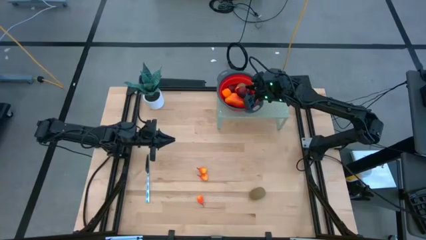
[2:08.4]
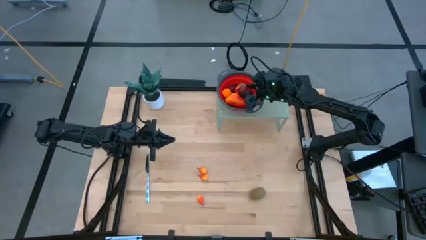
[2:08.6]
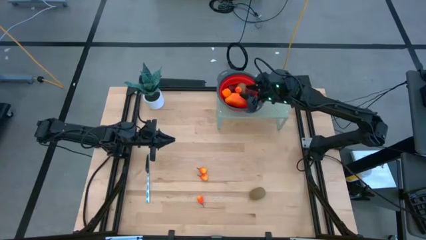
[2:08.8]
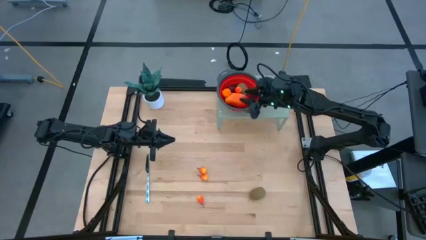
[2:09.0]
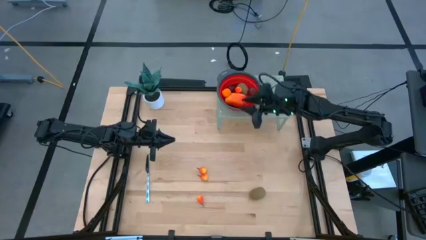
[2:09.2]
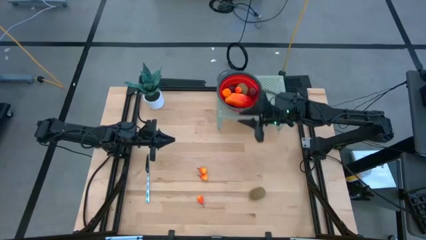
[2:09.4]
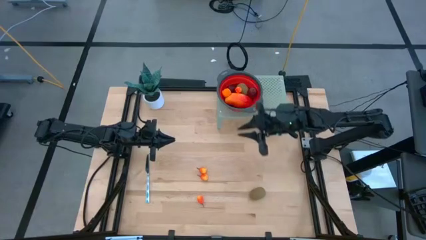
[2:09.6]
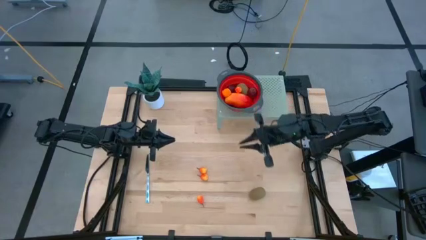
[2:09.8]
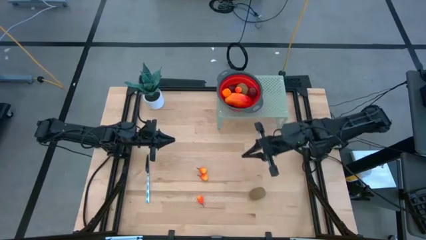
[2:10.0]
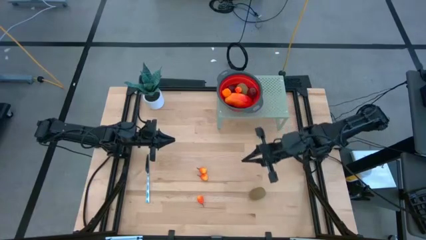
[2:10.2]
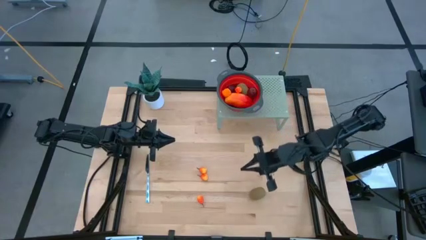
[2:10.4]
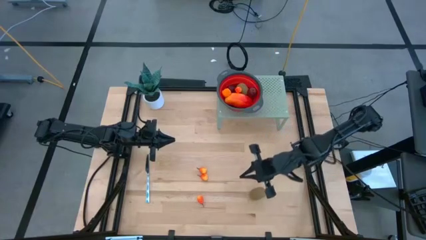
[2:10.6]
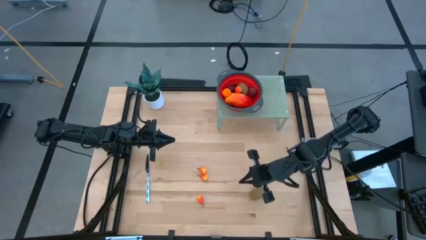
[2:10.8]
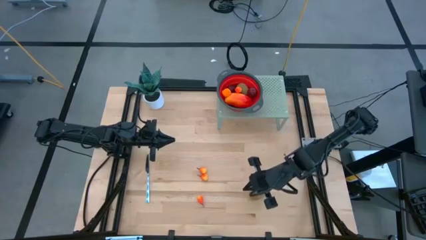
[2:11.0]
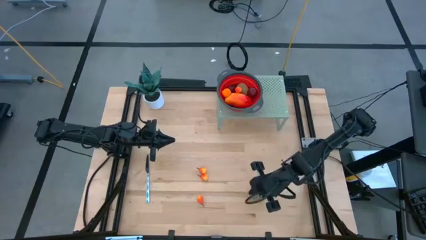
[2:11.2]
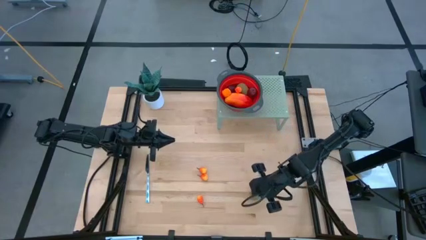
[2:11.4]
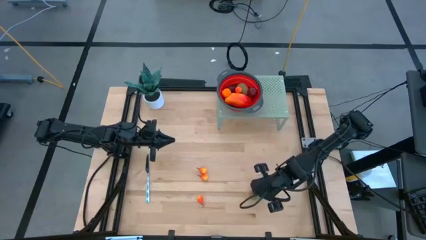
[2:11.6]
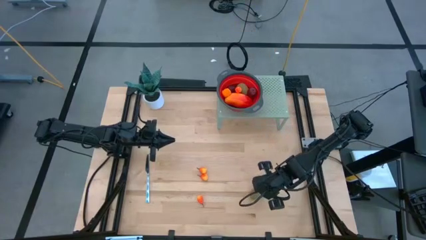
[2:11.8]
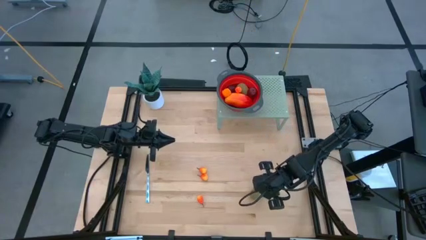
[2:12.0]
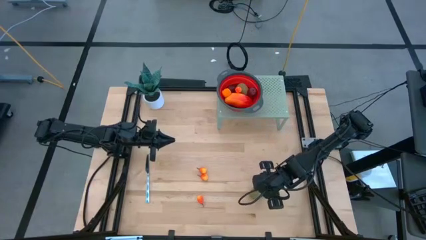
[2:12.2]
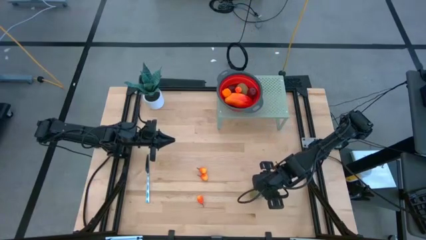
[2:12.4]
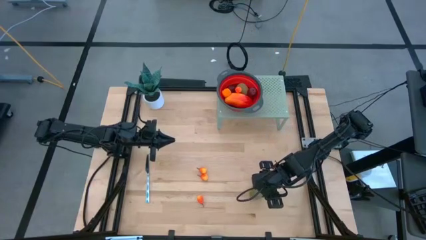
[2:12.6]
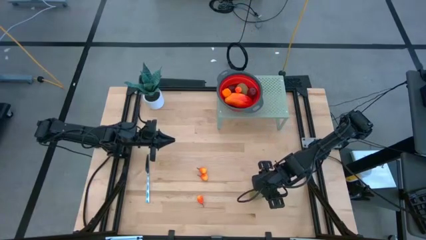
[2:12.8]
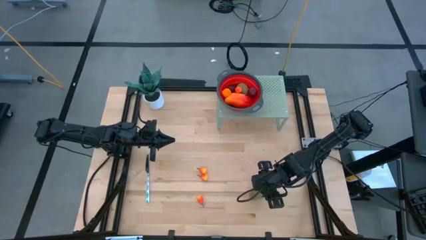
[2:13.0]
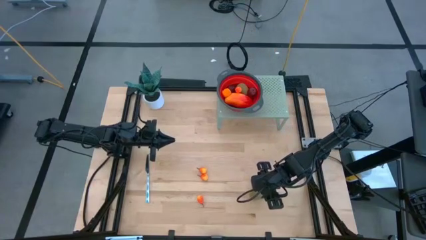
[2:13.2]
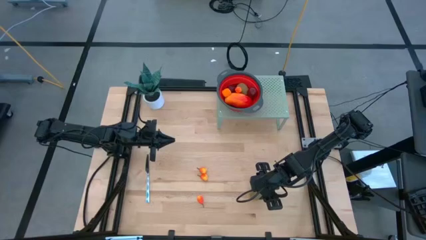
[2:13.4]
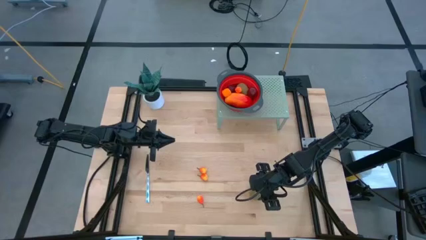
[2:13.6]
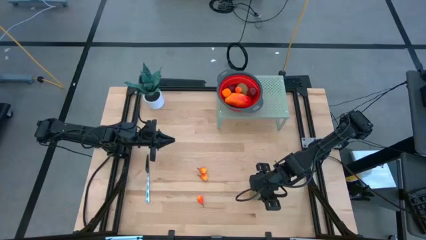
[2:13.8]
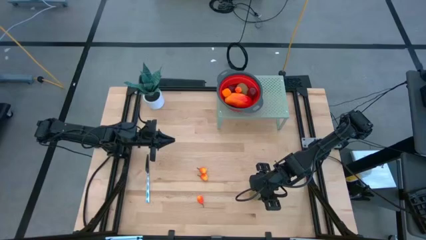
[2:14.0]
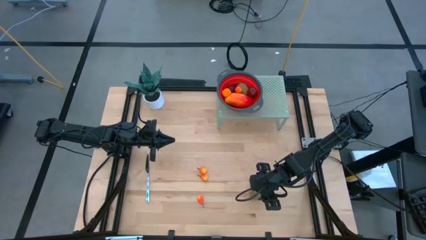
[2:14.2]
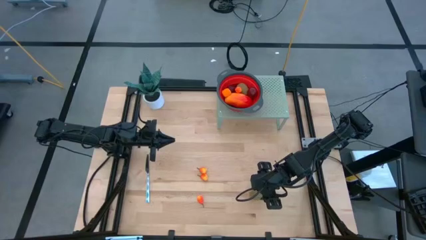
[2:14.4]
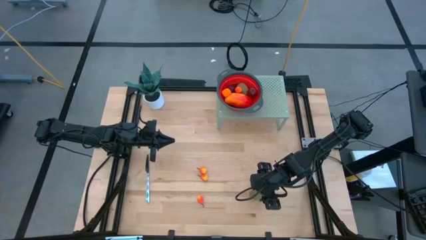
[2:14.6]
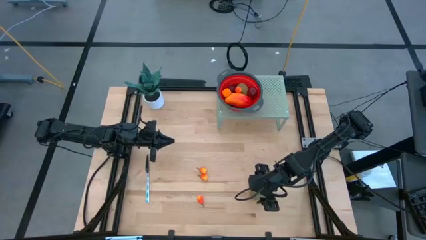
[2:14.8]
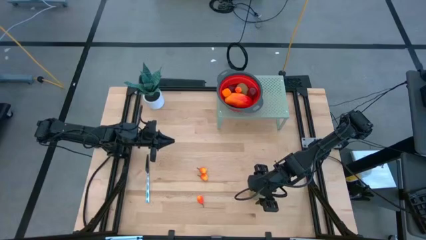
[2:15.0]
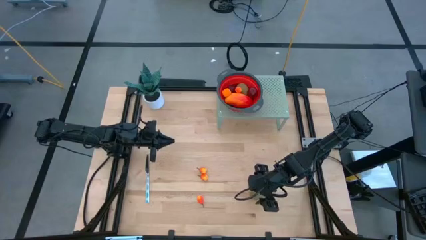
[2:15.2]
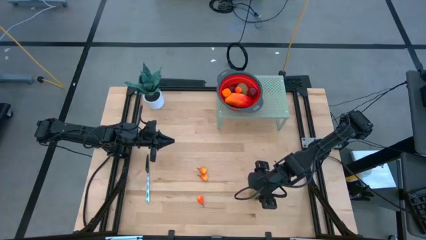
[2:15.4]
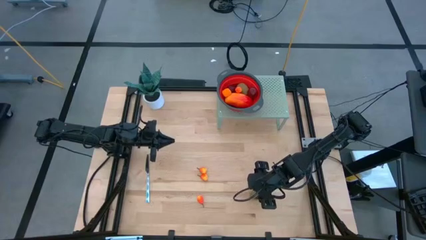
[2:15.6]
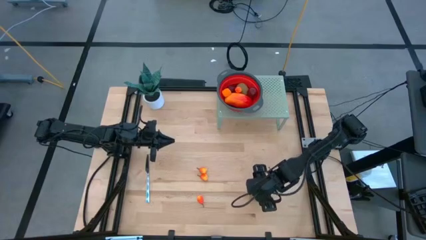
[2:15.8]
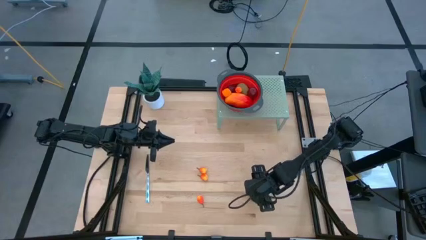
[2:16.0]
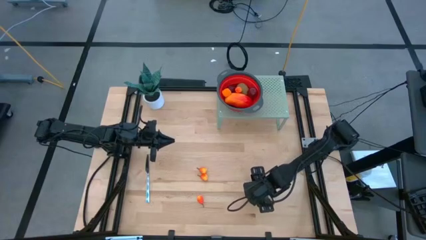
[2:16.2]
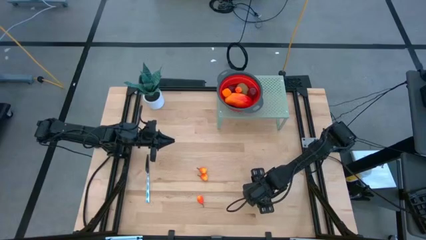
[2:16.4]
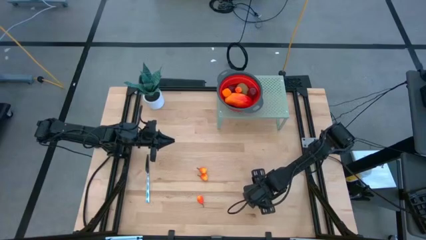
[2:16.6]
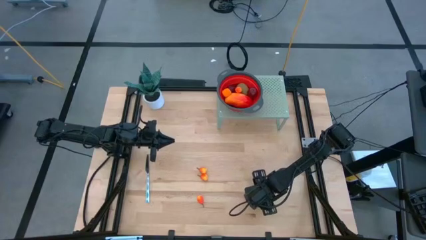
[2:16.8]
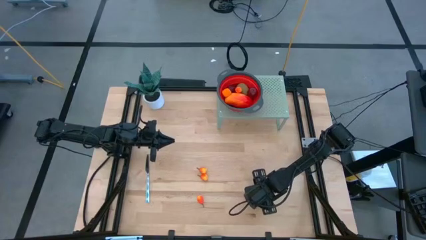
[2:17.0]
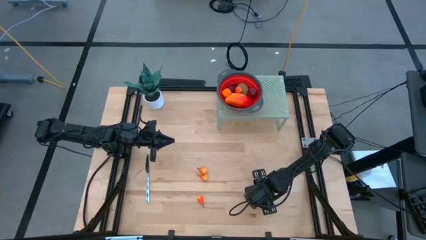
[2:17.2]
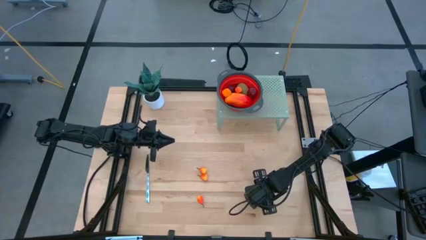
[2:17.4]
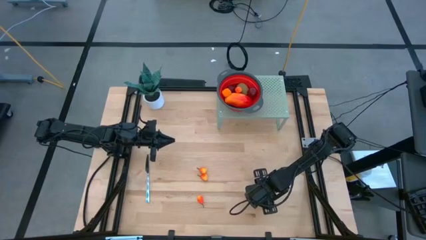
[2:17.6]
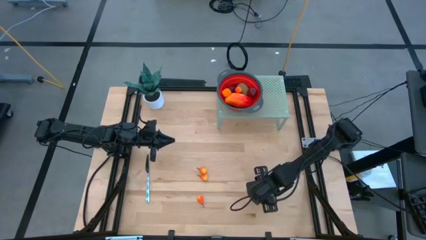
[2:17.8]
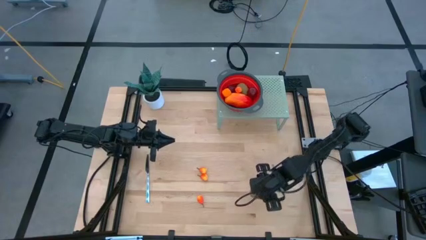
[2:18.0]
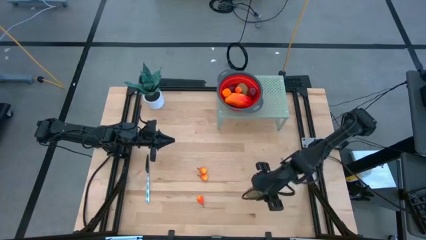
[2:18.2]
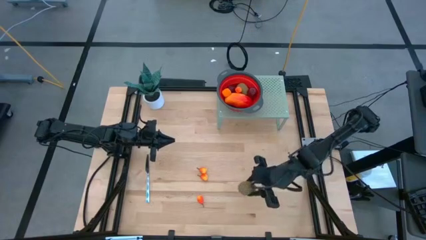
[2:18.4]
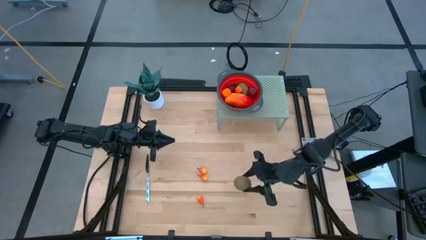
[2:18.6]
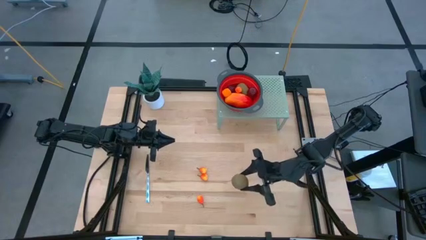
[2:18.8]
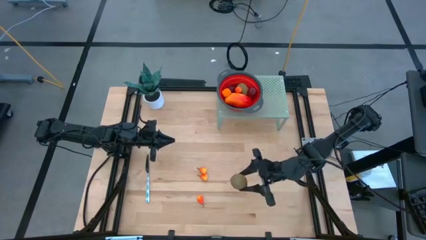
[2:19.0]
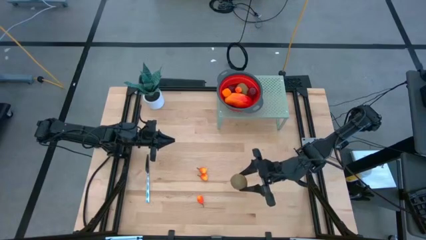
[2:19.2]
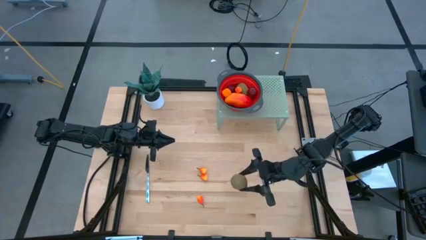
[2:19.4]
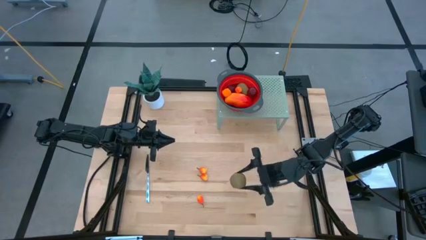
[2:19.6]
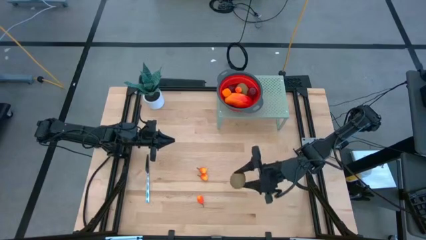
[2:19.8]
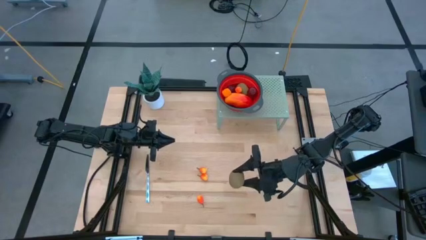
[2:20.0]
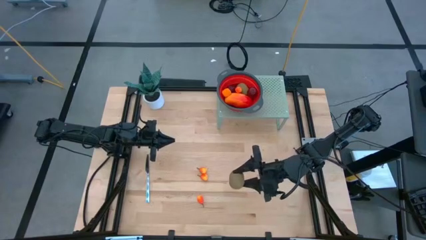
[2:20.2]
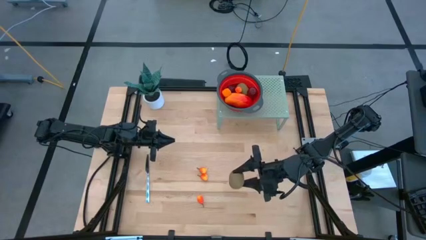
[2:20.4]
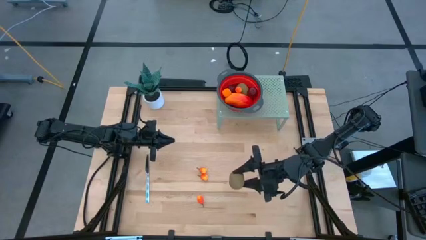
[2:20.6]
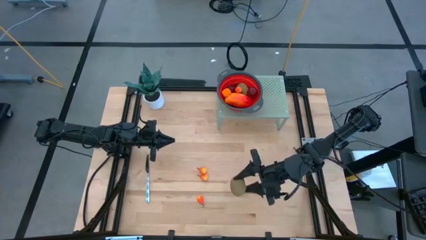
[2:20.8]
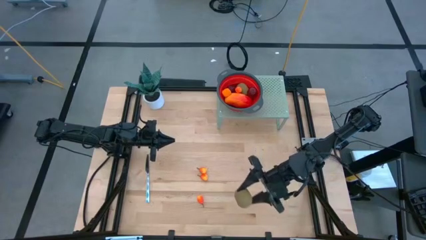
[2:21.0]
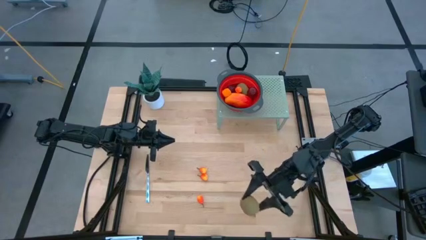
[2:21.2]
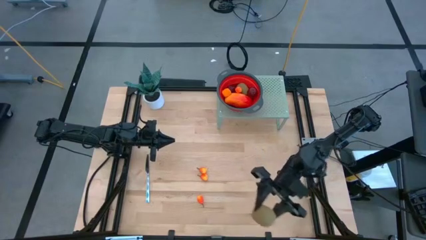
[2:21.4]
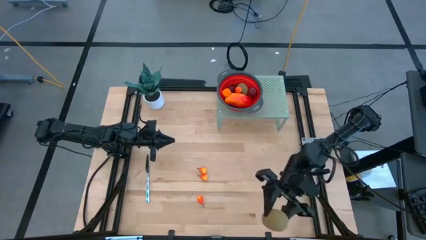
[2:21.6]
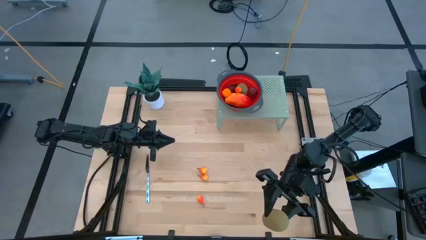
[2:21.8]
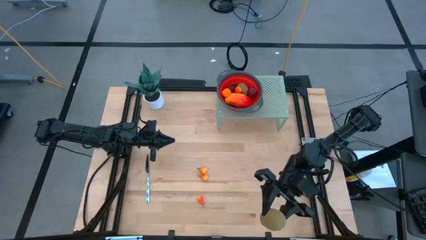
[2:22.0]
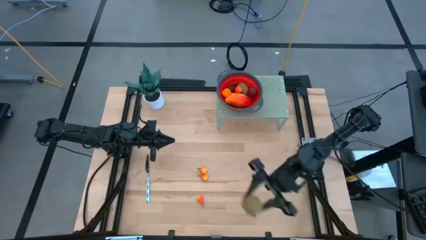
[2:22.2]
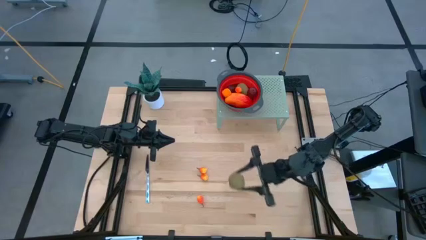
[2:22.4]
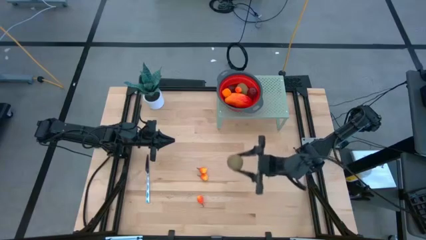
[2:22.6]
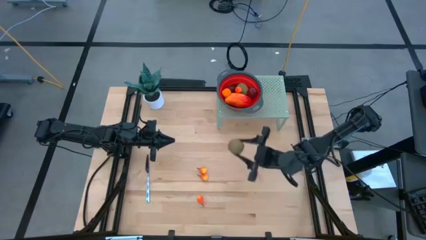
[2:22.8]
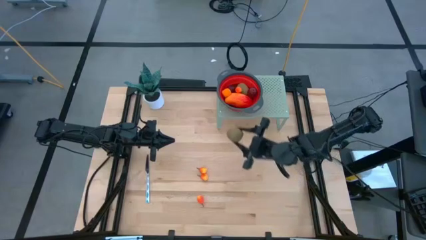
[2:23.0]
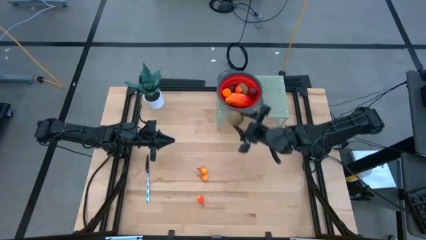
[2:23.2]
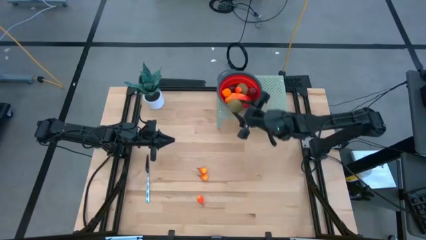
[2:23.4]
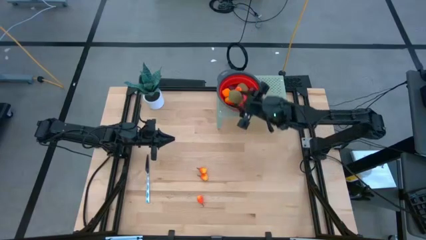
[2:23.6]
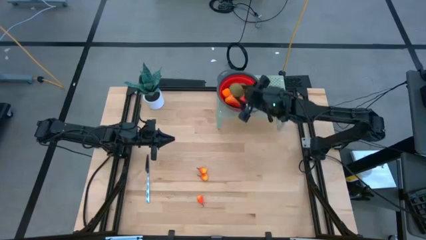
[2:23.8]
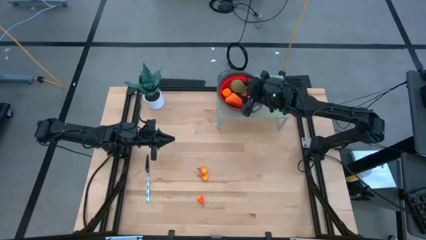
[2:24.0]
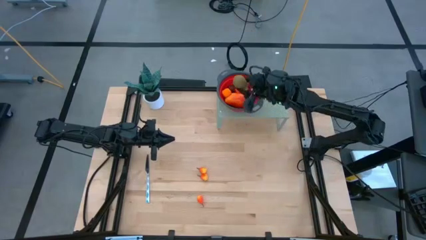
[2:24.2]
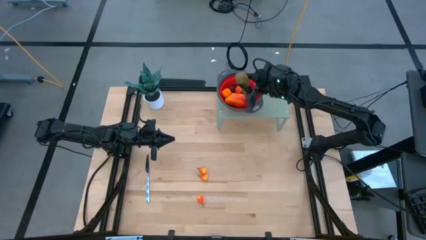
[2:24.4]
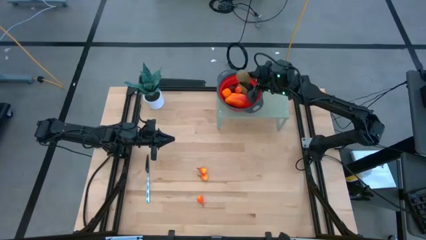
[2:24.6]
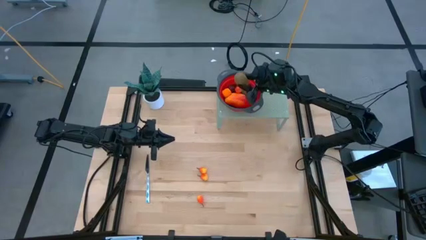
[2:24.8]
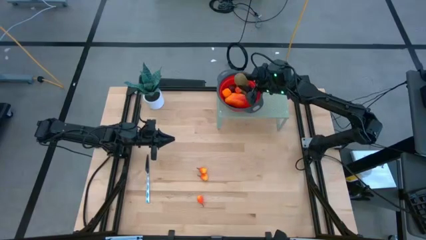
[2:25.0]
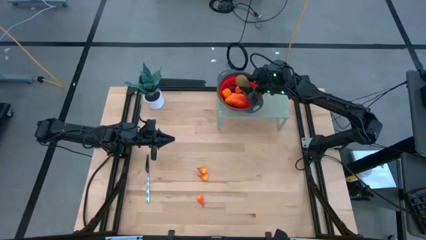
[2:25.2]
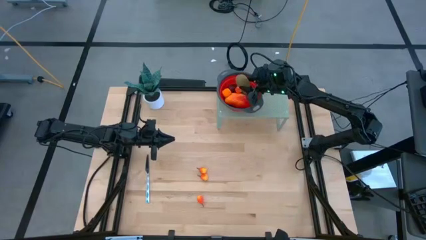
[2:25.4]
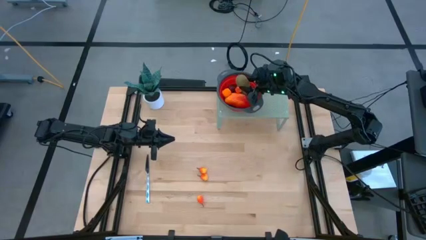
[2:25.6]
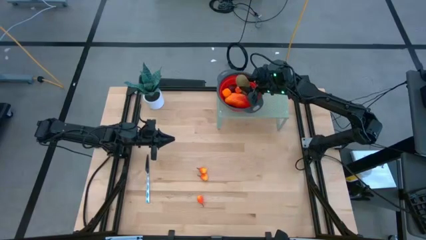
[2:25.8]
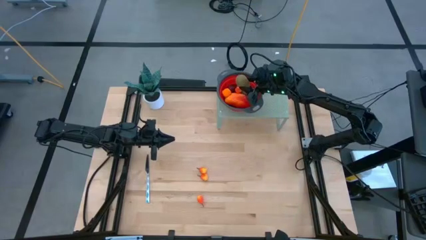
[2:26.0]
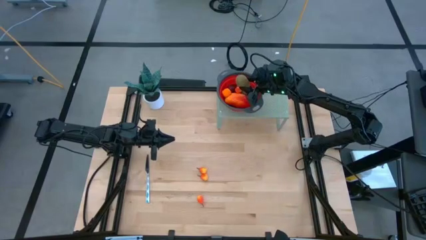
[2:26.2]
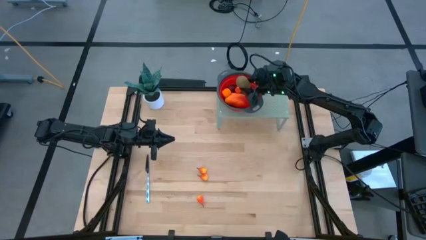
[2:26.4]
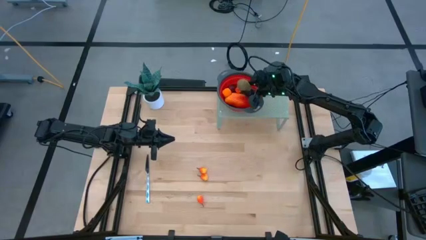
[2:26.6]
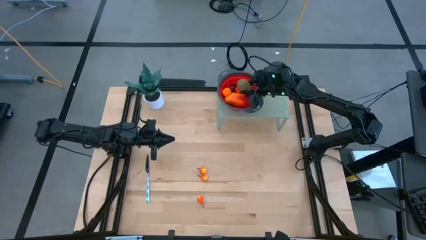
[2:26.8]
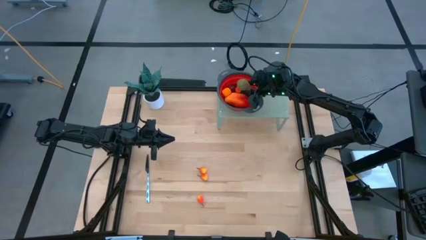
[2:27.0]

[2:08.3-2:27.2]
Task: Pick & Place Fruit
Put the brown kiwi into the red strainer bowl on the shelf
